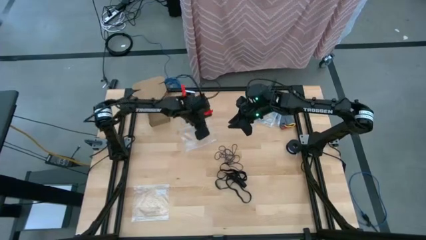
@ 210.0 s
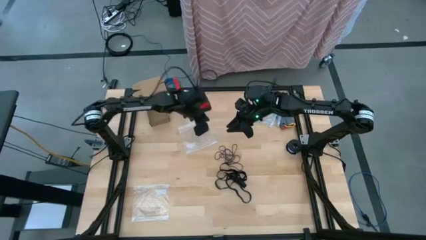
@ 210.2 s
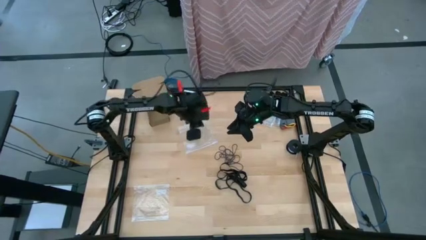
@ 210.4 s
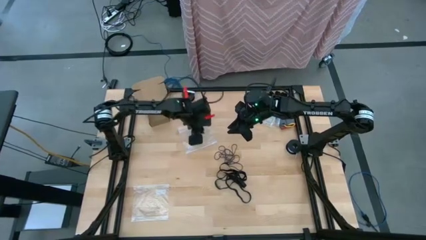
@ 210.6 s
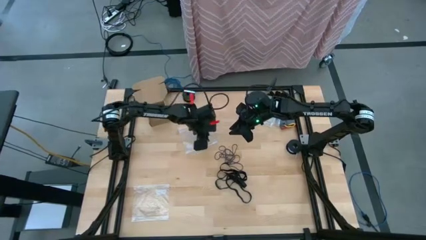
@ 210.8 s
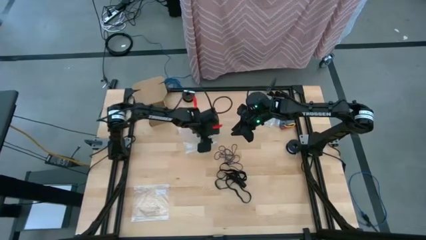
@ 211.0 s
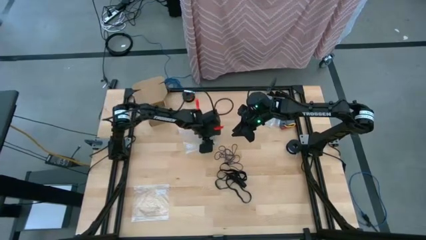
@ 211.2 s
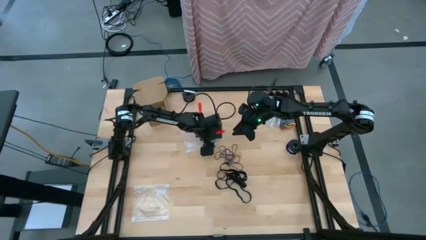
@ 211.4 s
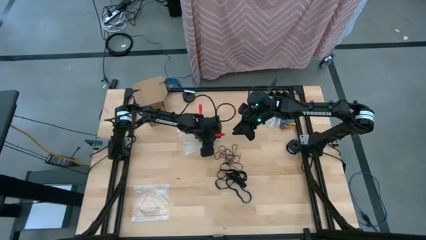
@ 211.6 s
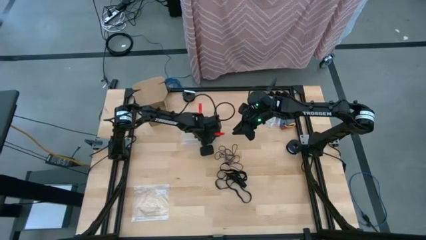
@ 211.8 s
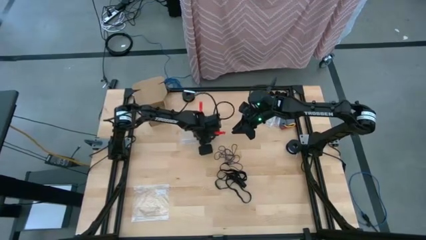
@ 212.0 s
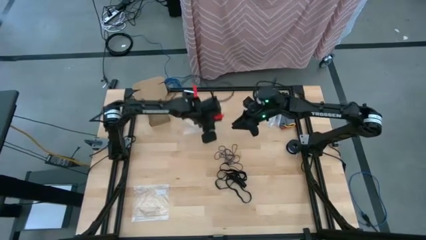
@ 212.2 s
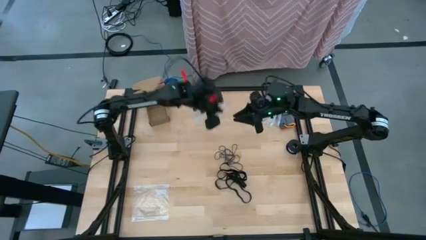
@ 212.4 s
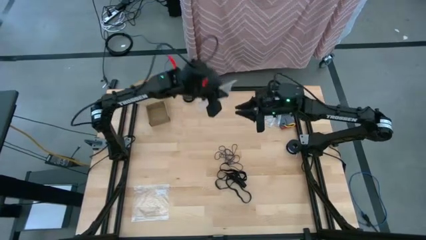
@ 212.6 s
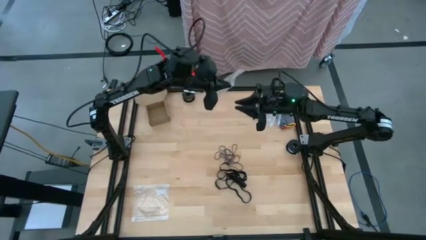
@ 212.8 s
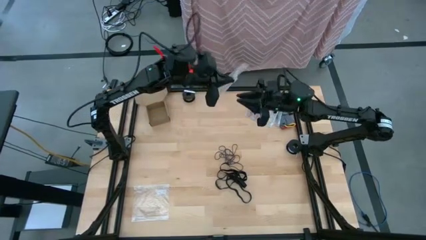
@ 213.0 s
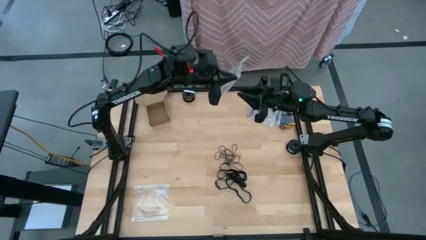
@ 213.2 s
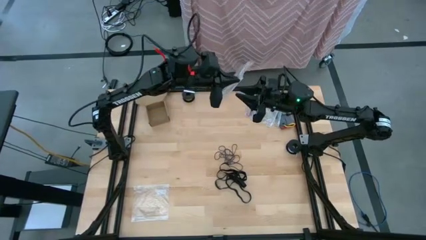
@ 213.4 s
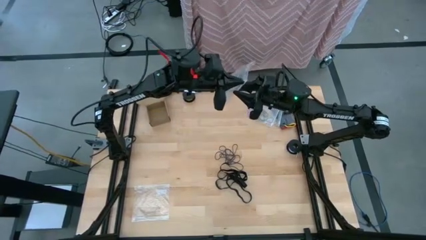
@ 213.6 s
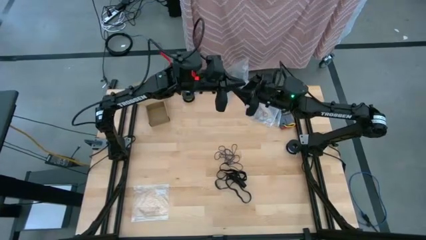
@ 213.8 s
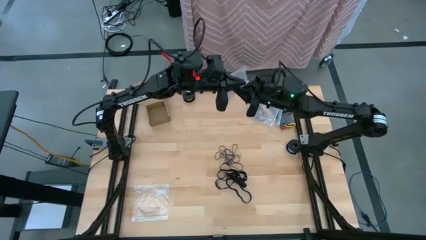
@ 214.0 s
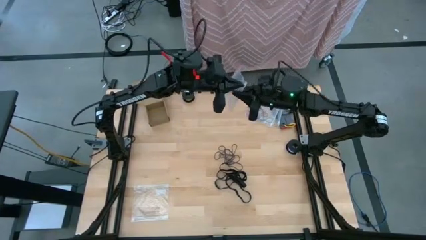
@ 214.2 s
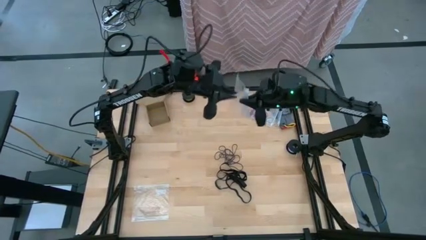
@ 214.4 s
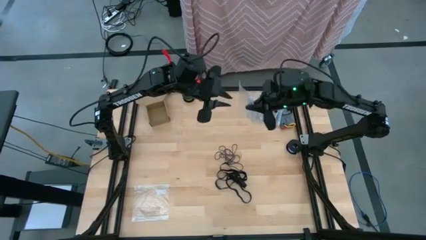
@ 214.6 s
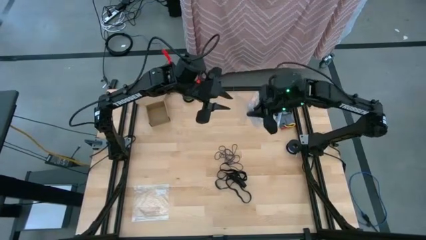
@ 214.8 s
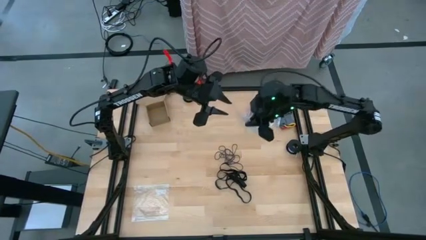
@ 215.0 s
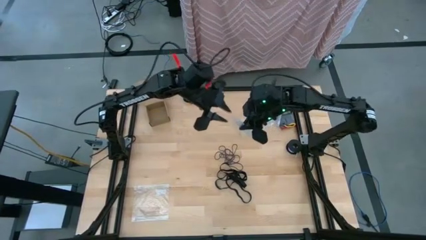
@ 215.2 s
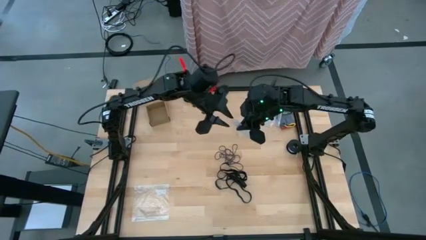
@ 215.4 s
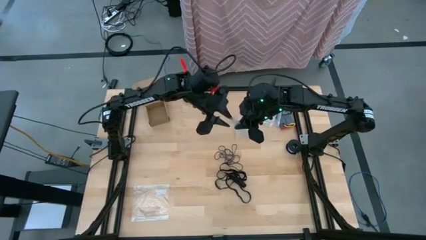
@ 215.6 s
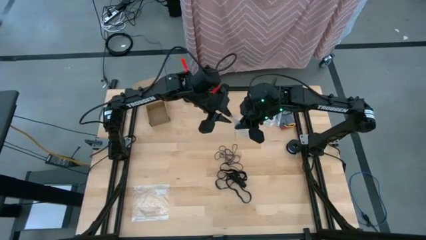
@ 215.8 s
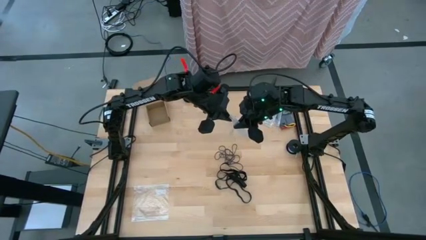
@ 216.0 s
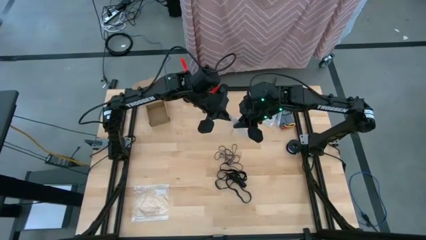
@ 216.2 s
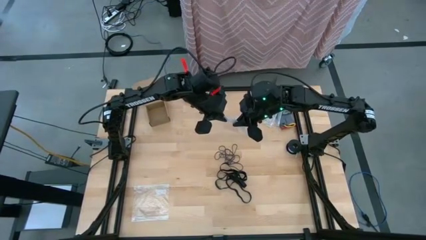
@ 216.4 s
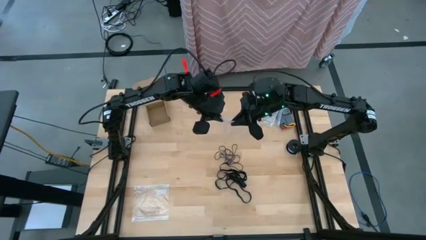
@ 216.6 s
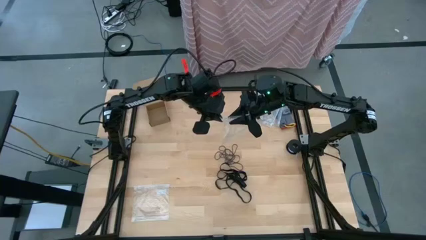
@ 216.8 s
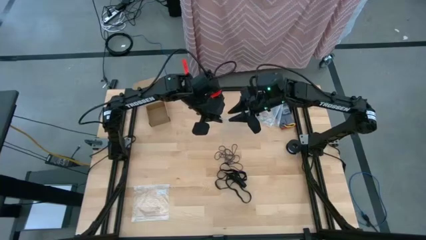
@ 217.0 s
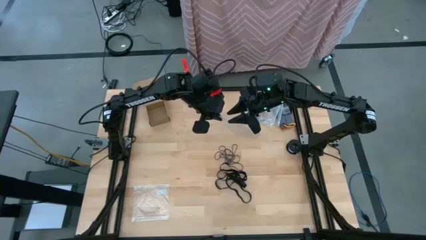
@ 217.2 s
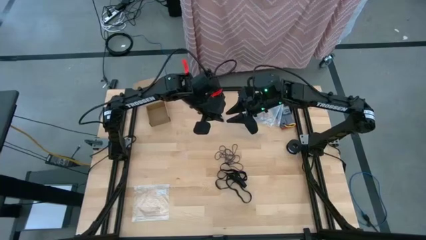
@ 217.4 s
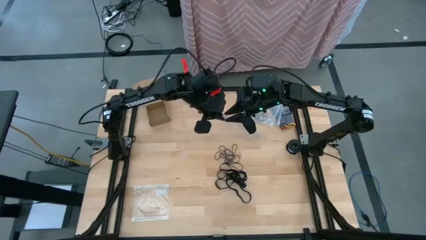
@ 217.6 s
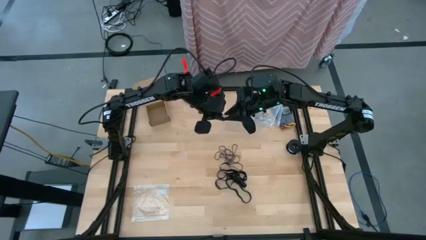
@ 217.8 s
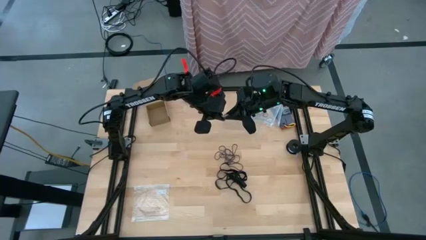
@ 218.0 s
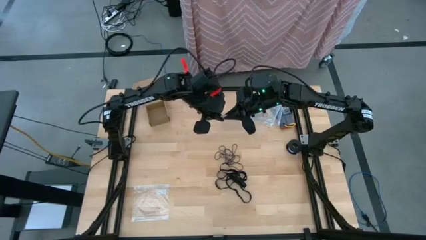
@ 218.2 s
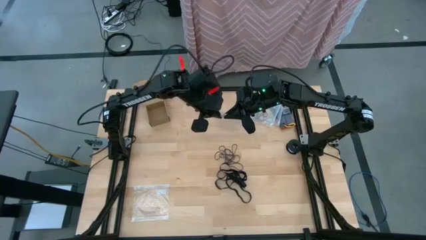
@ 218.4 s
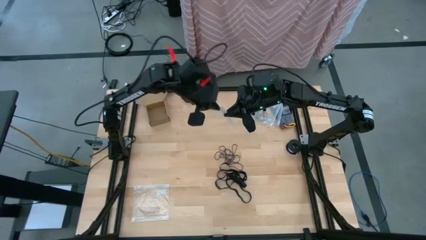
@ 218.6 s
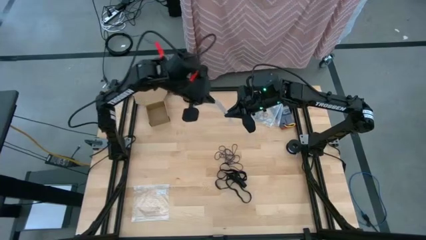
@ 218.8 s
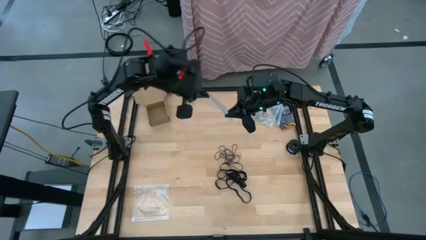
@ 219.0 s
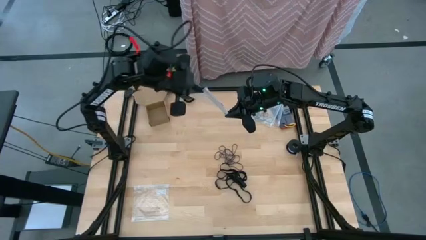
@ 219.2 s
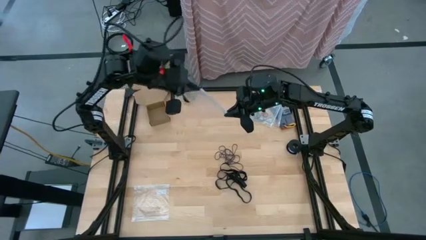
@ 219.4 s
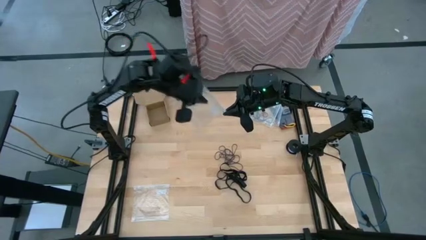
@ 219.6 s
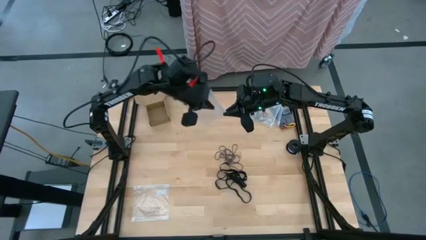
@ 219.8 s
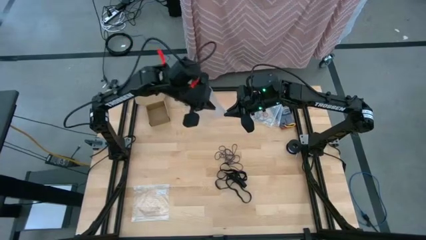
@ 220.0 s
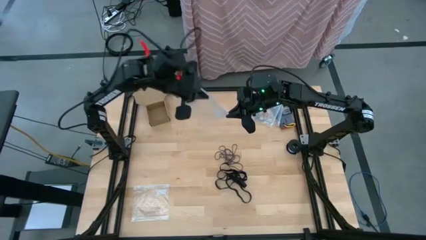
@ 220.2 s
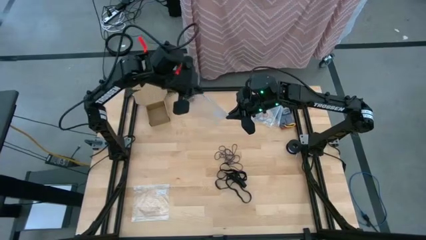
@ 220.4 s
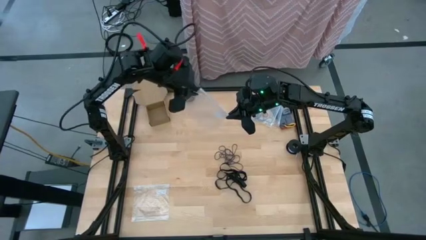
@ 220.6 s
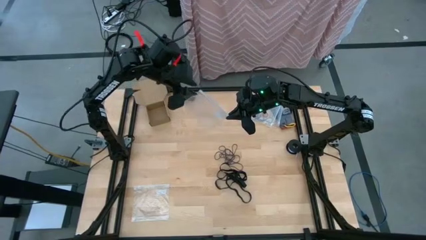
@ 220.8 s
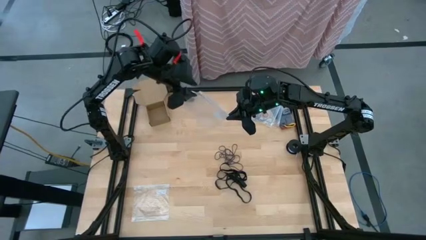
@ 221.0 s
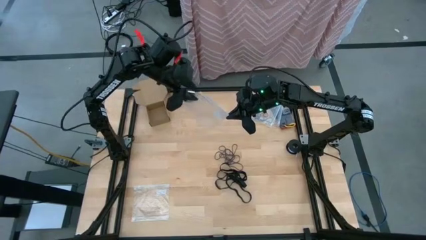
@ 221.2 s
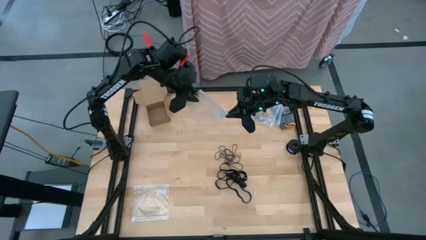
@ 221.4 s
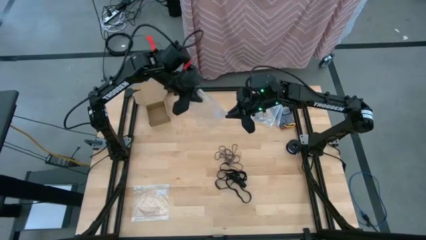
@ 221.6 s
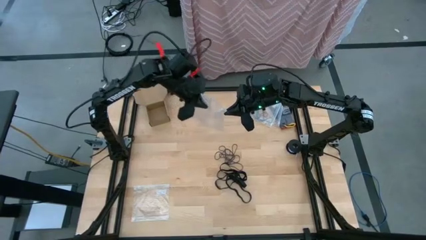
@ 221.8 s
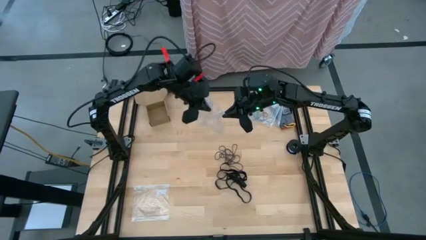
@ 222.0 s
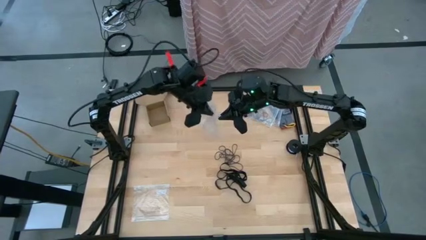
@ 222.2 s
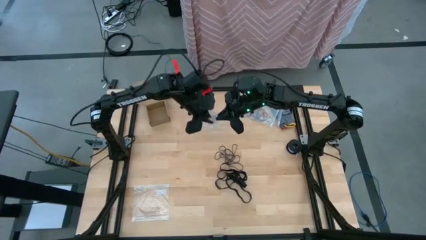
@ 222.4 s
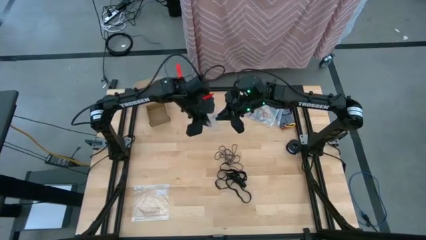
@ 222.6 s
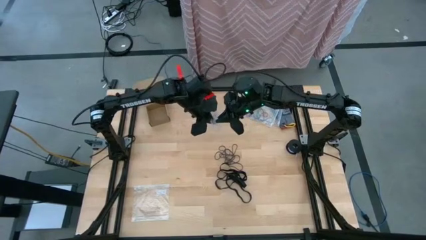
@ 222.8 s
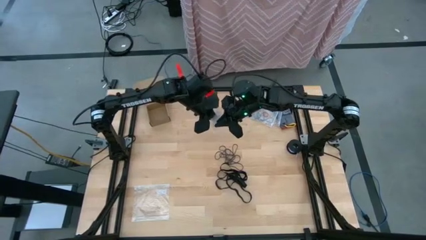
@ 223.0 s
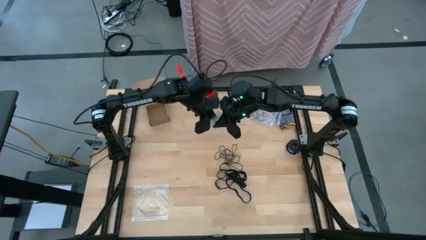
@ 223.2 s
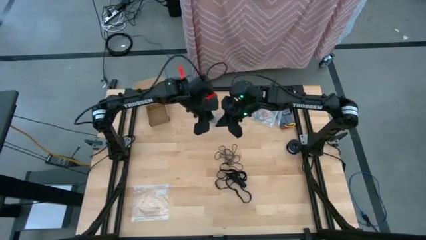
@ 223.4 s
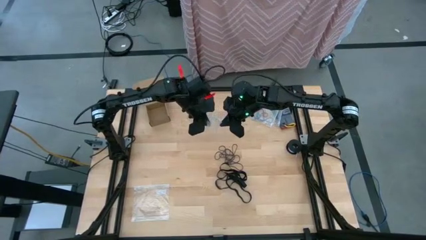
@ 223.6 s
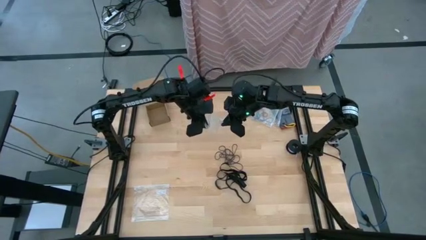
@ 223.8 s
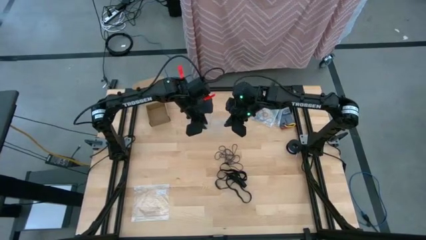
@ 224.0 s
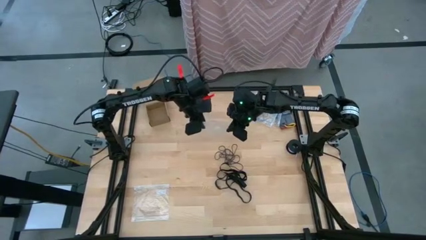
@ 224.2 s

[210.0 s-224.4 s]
Task: Sort rubber bands
Open the transparent zip bag

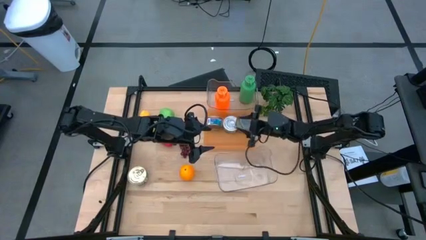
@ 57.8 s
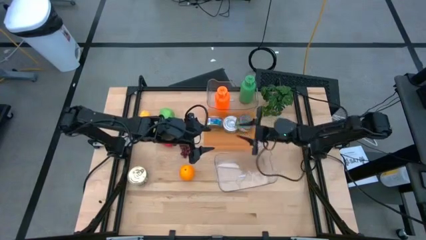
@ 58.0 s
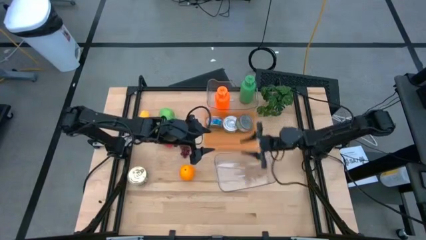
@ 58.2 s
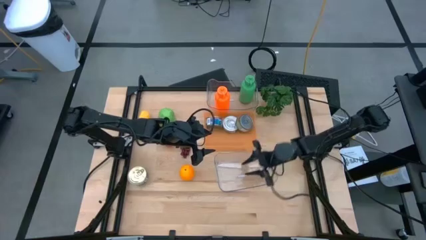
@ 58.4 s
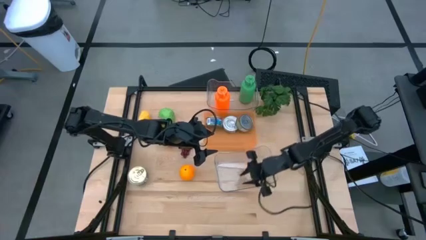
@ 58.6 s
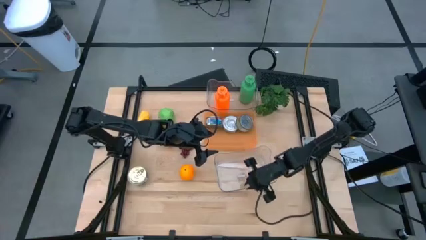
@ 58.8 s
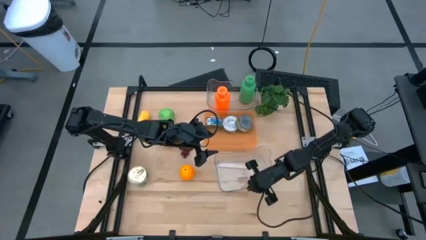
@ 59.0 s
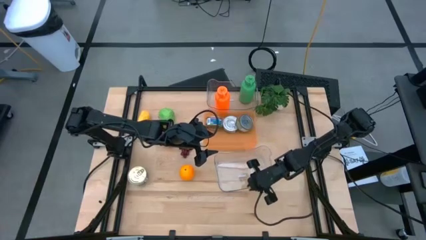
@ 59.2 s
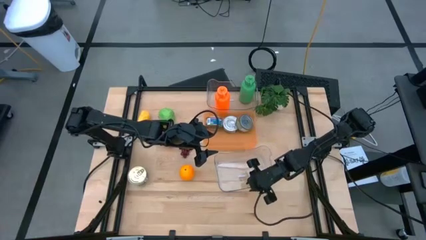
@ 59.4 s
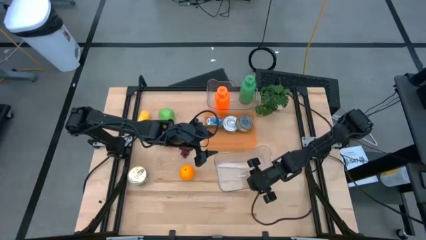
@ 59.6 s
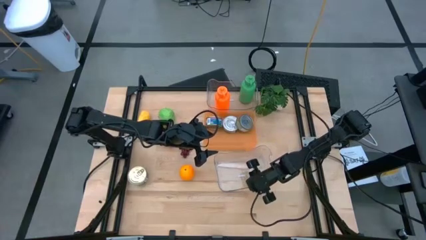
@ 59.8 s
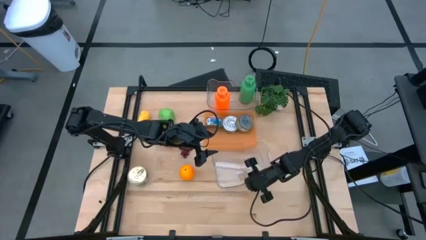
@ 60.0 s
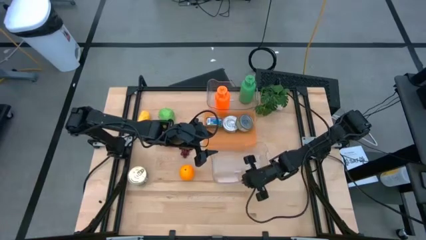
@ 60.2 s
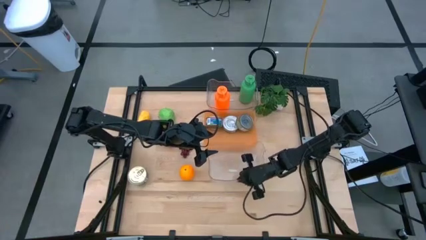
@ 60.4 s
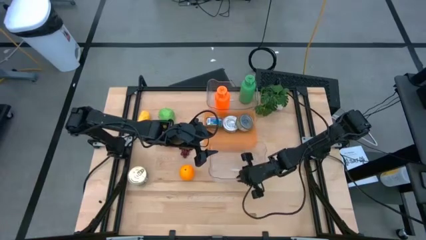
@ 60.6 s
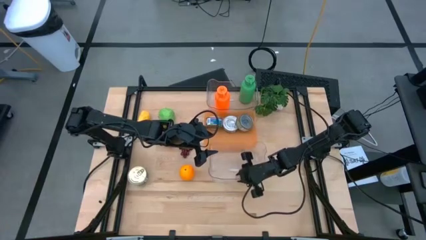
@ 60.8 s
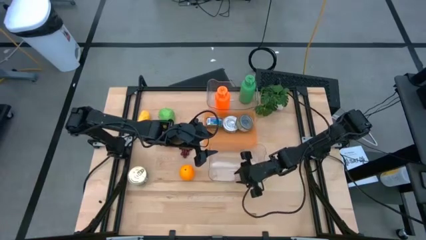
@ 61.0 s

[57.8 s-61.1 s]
Task: Pick & Place Food Item
Adjust the transparent bin on the table
